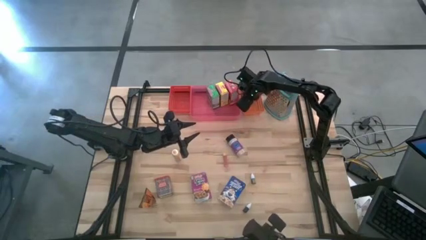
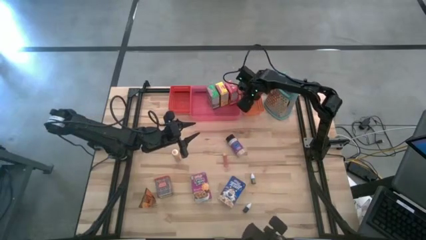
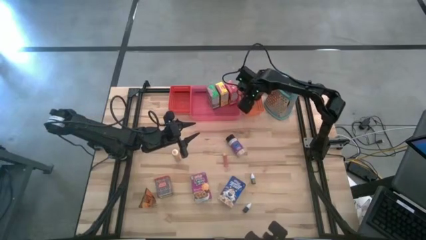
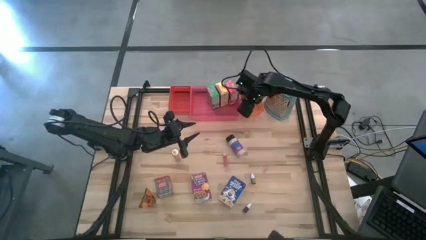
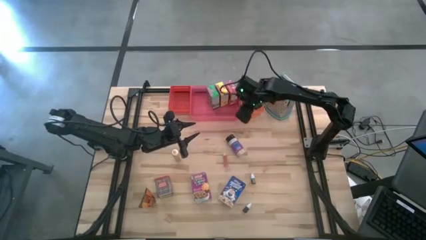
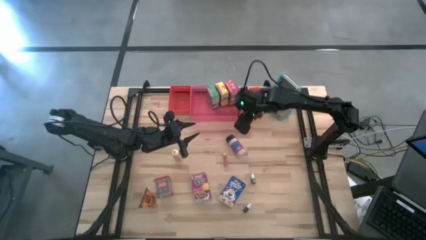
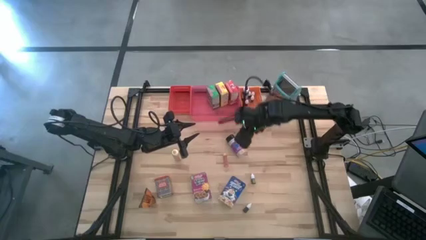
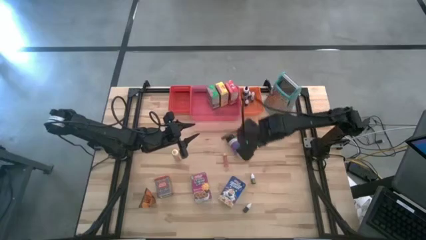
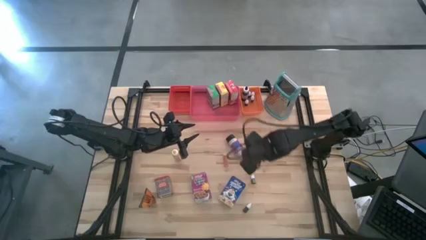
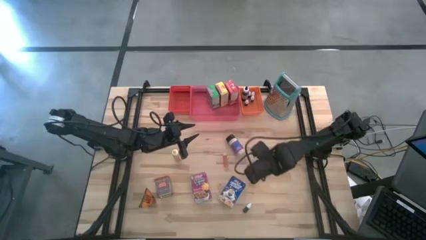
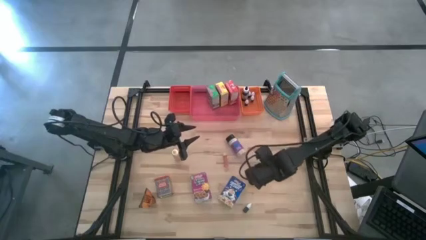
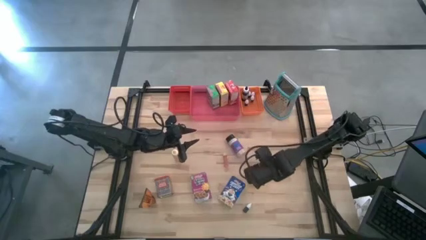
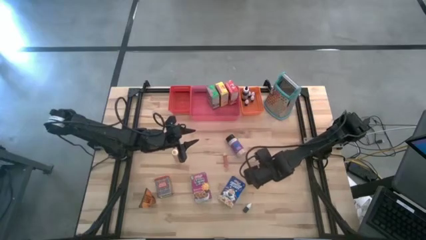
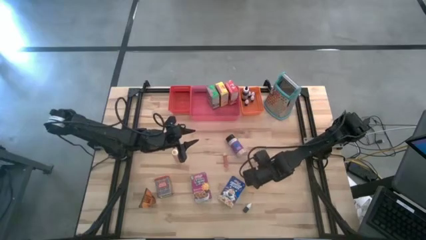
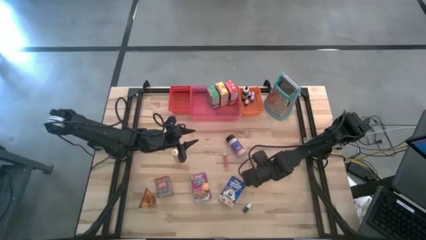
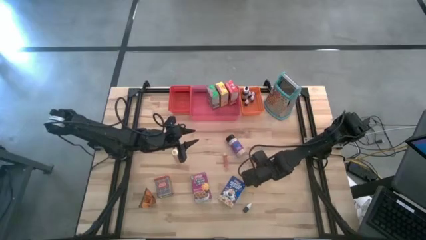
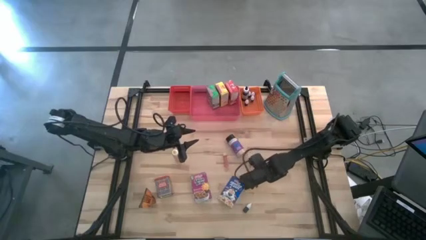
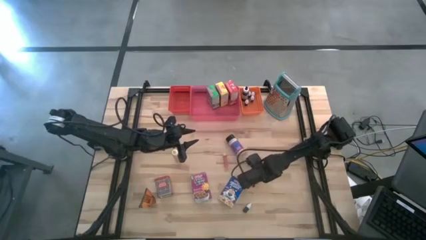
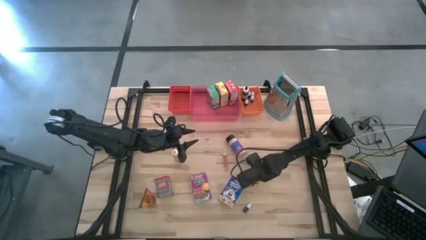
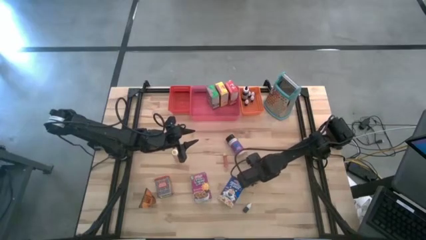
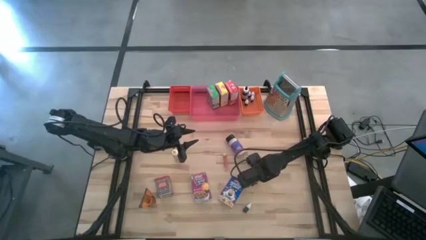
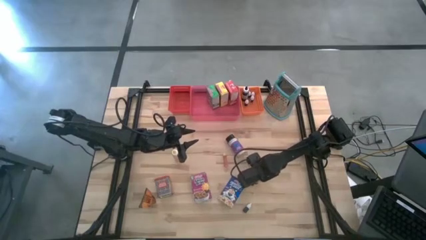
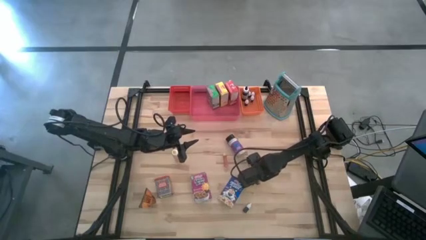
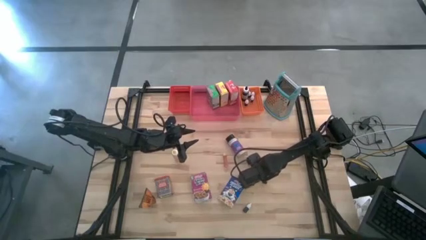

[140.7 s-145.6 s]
Task: Pick & Place Kitchen Items
Put the green food coloring bottle into the orange bin

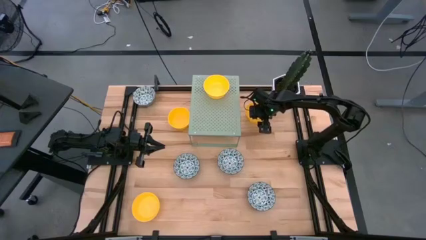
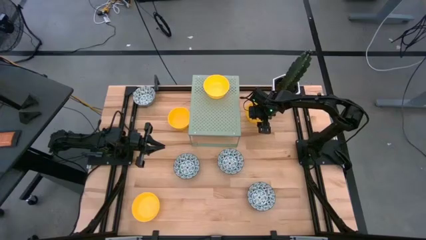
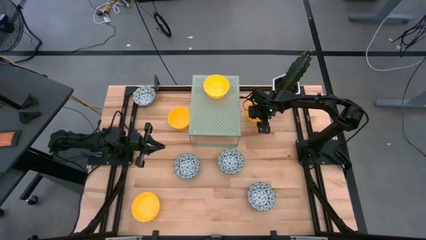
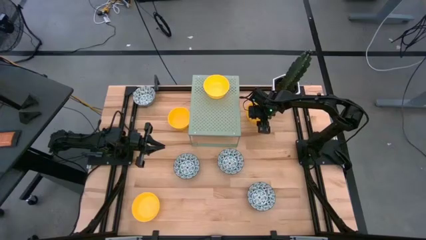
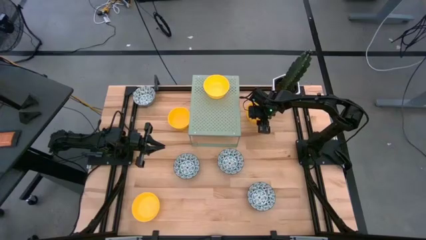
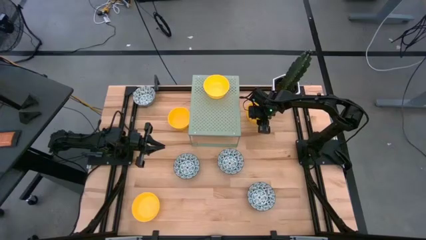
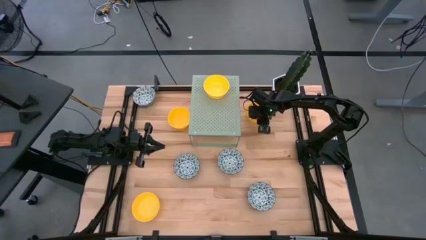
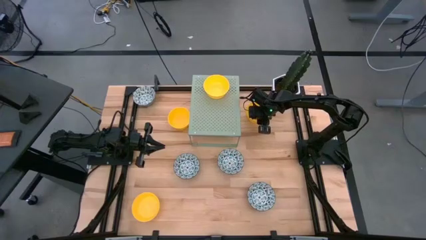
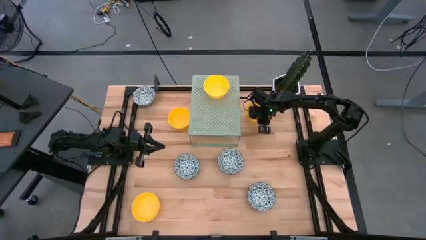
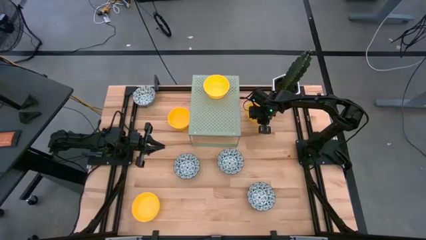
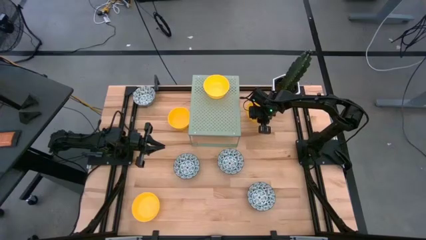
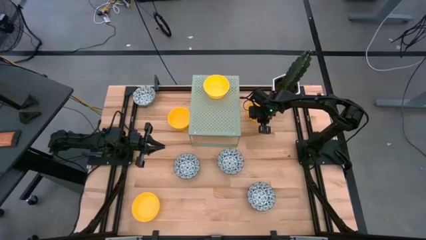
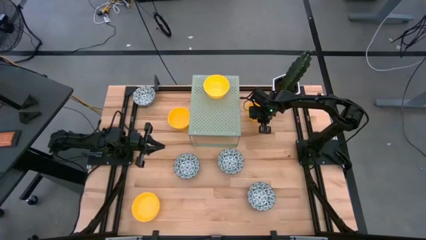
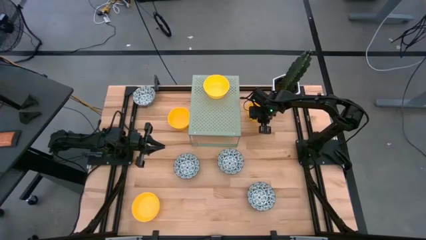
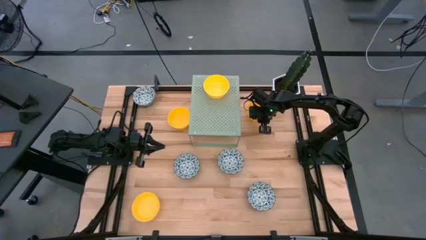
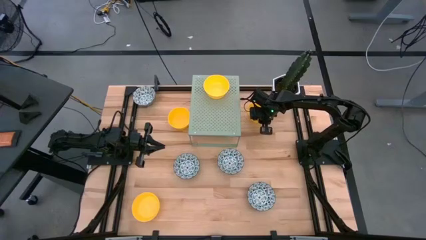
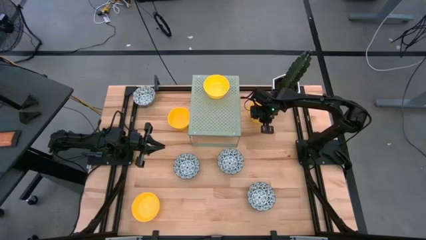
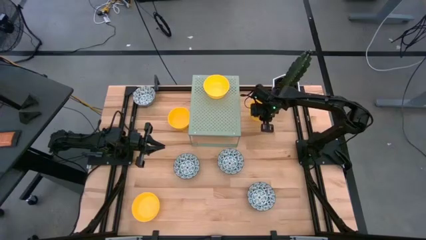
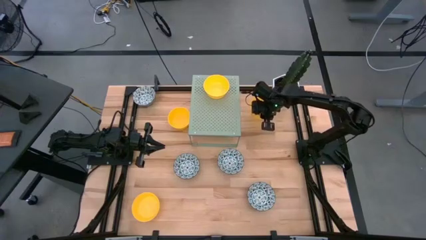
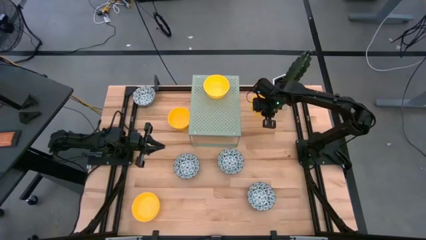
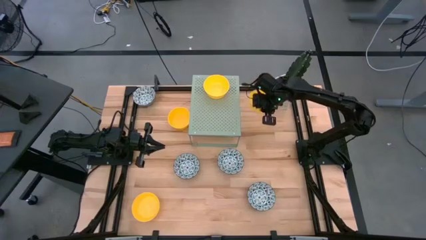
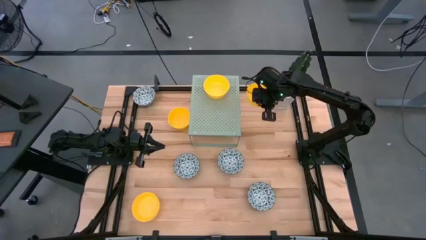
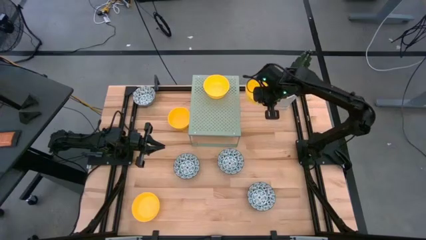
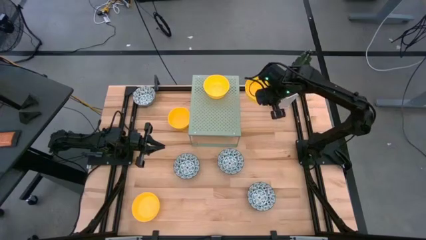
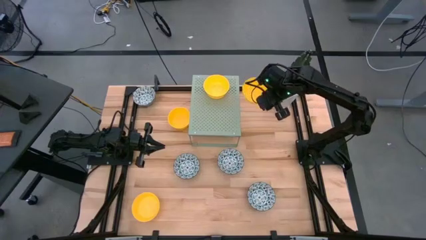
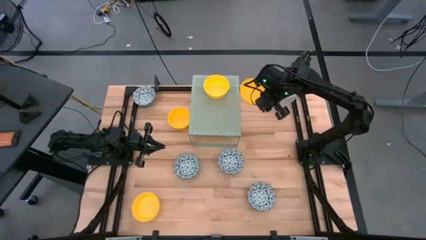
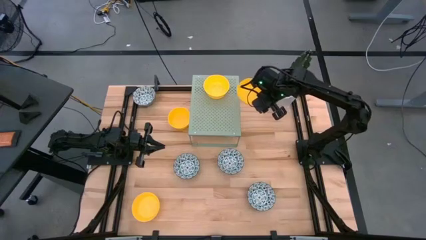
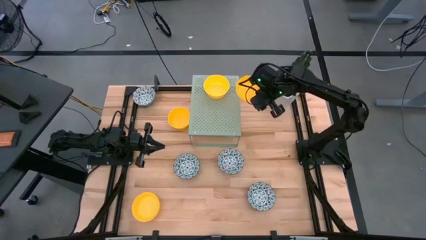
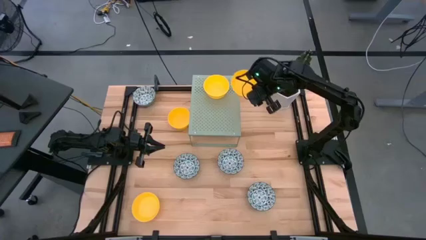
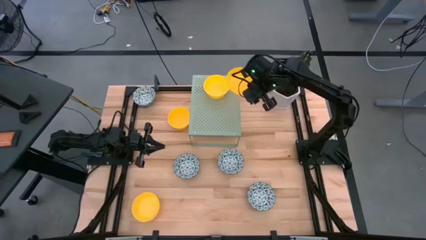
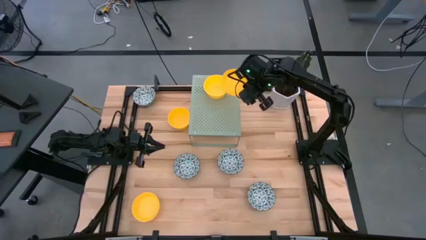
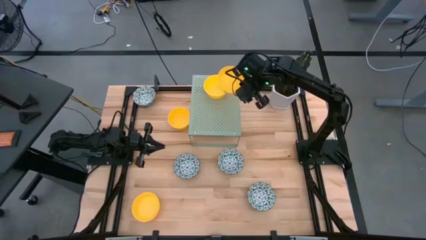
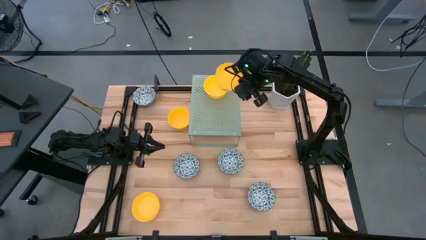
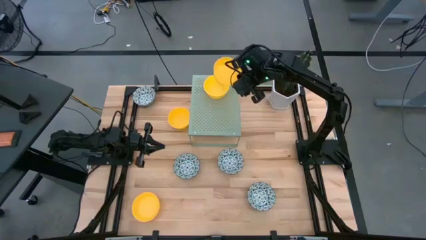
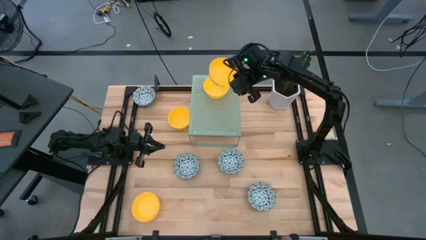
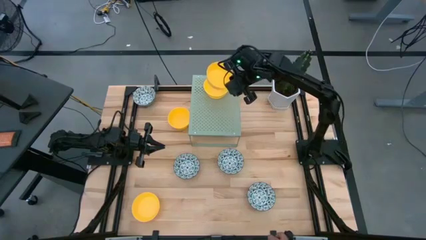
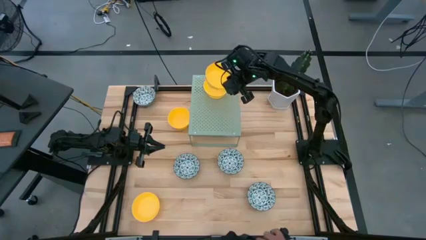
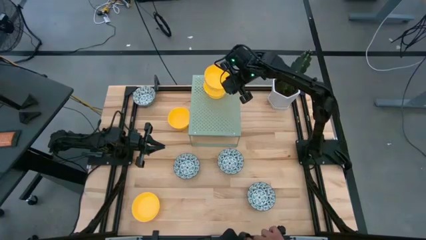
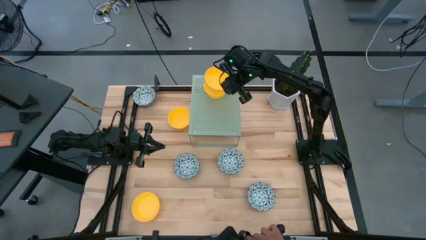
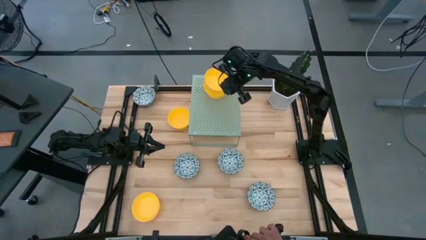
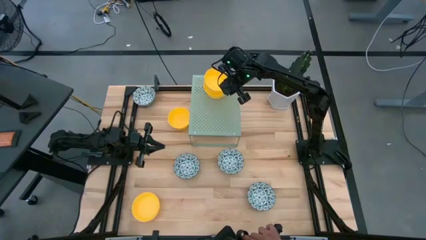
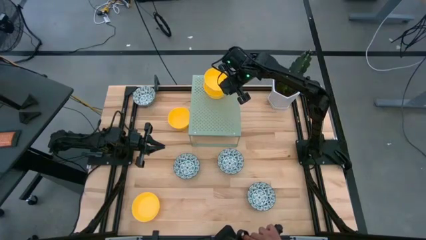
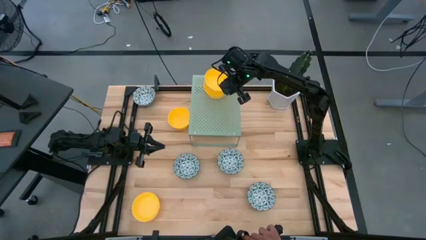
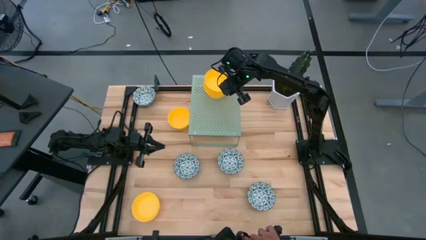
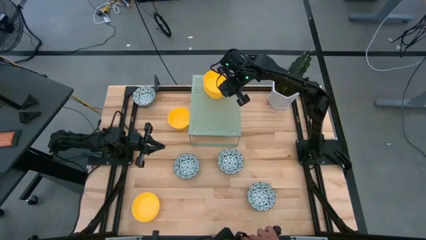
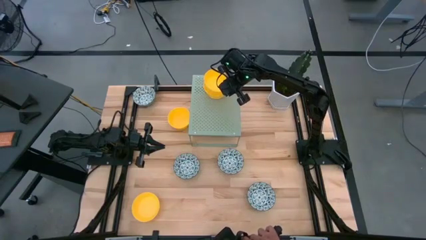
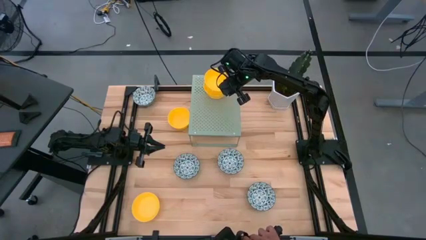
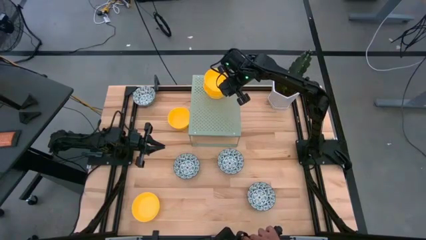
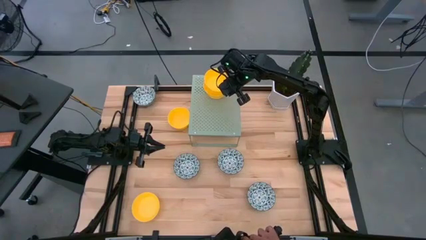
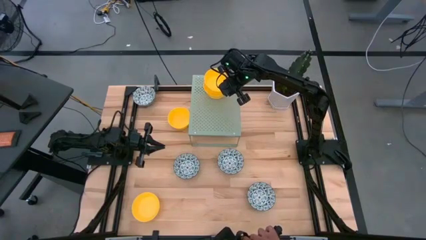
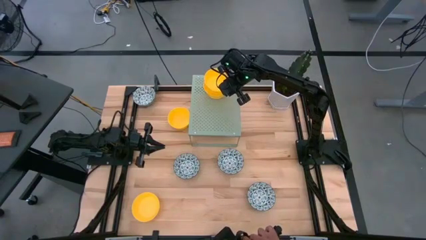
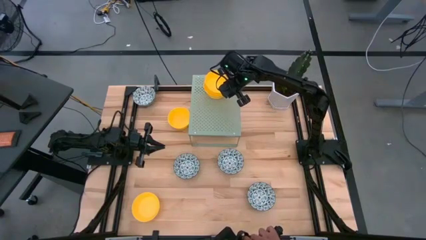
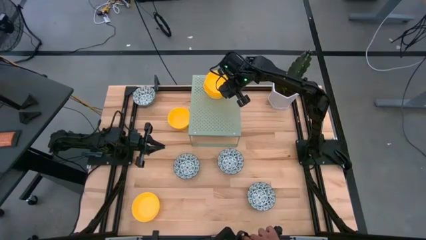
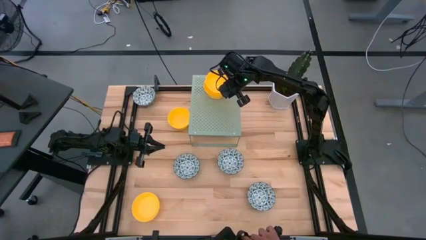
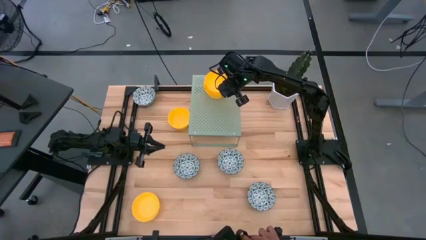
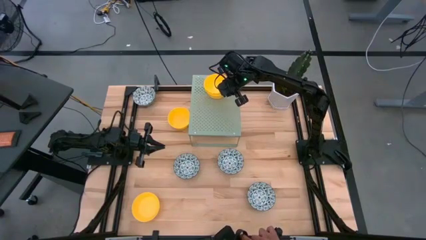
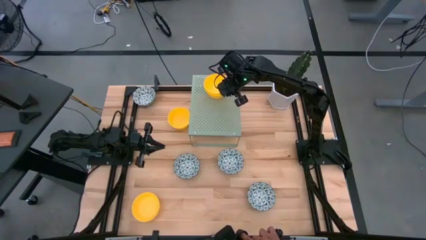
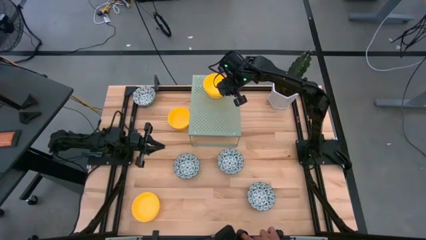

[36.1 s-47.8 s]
Task: Pick & Place Mini bowls
Stack the yellow bowl on top of the other yellow bowl on the shelf
